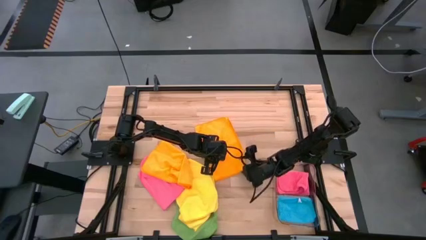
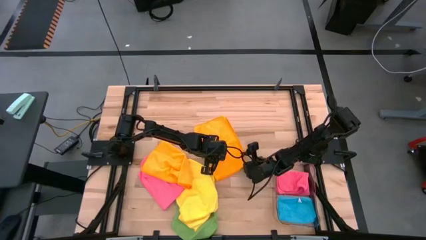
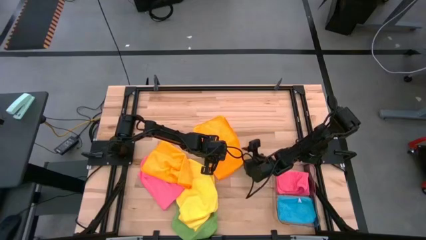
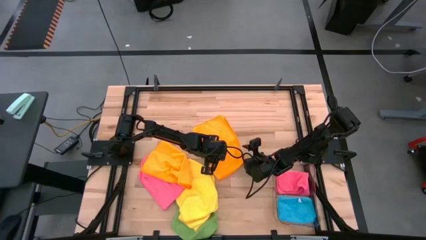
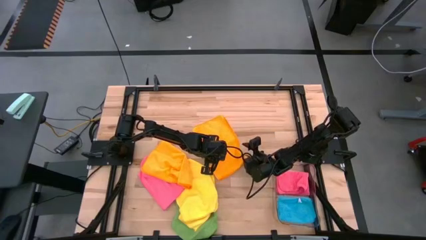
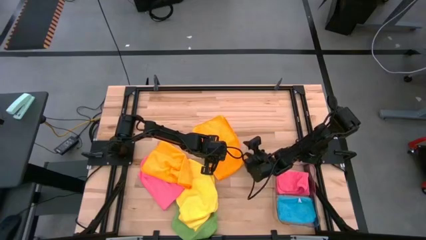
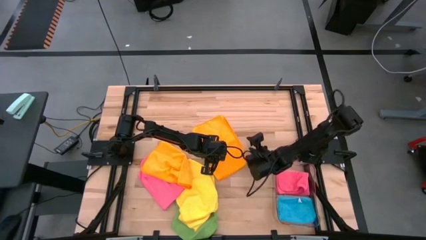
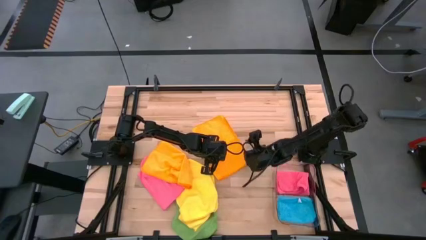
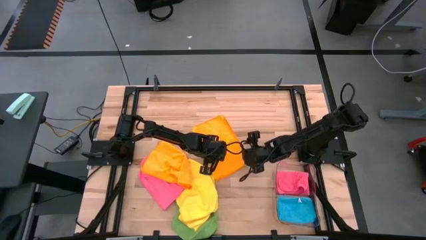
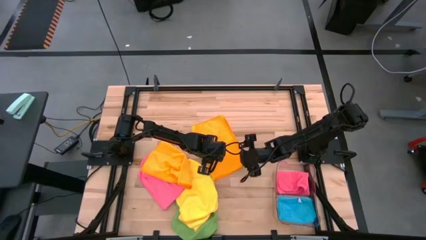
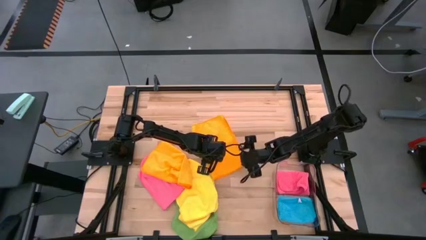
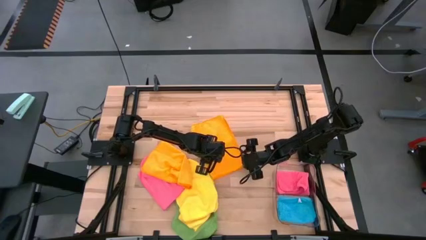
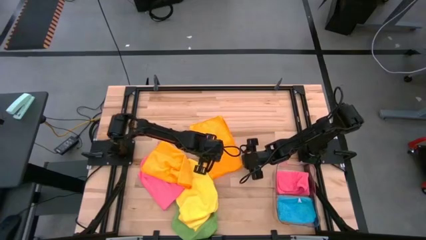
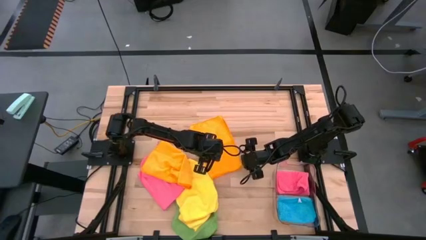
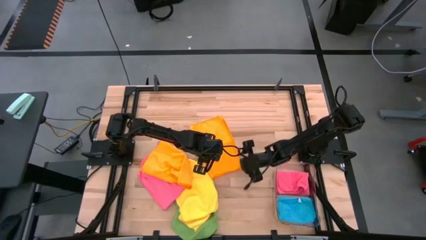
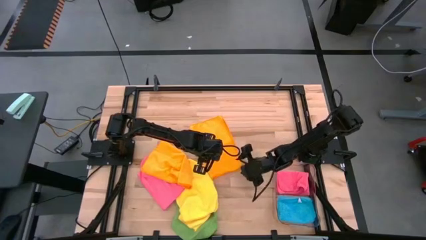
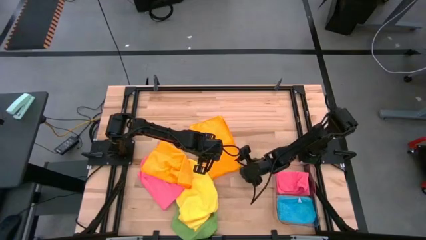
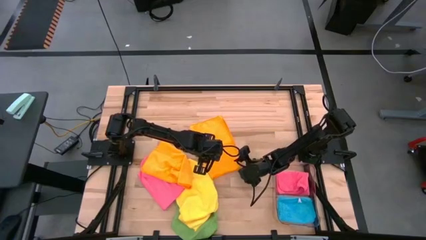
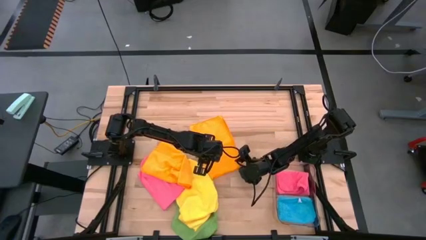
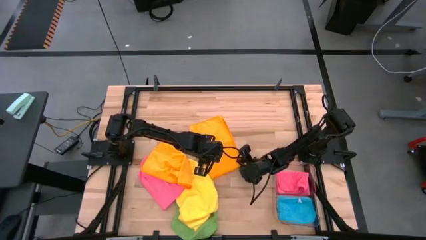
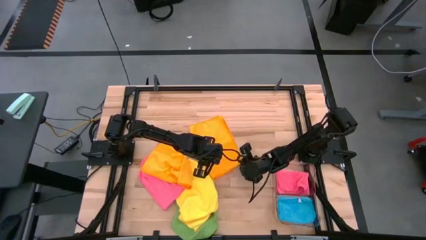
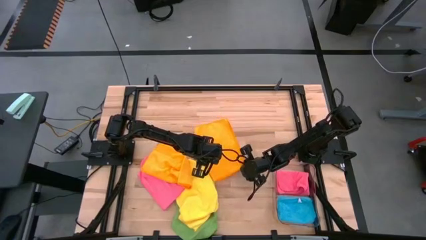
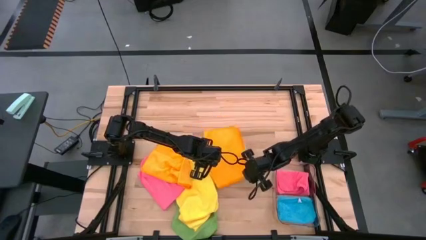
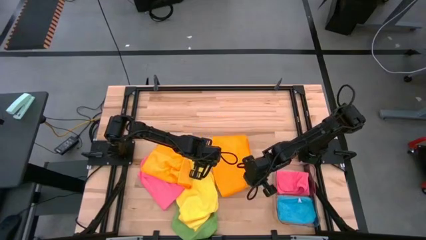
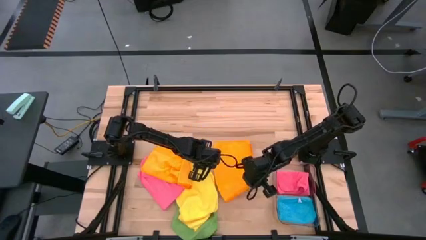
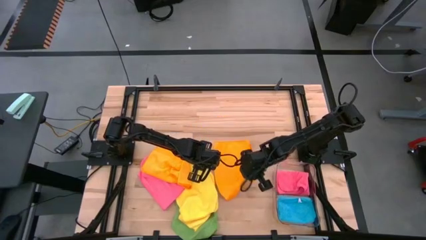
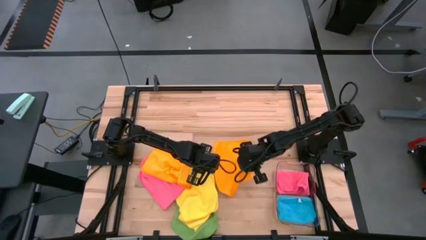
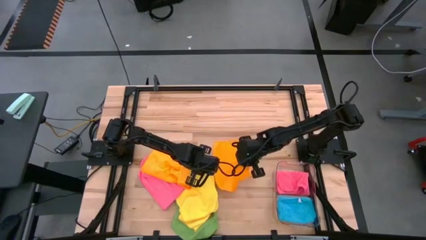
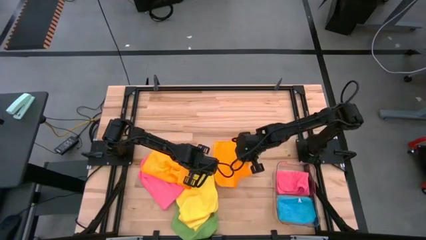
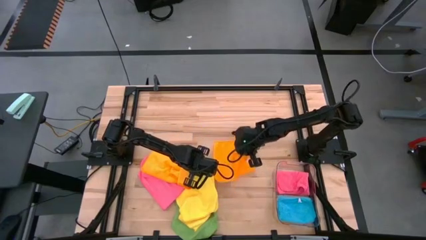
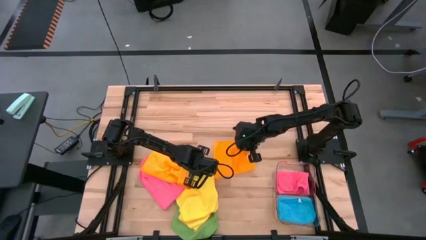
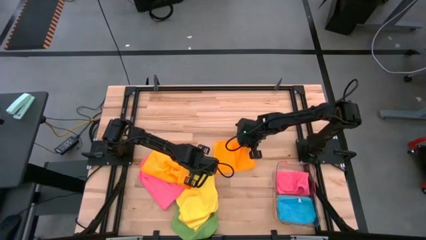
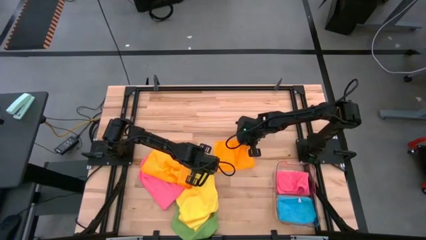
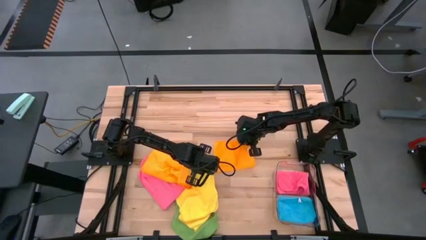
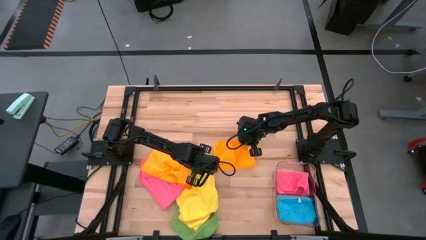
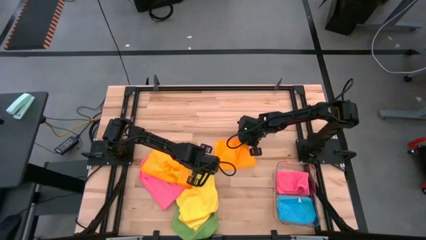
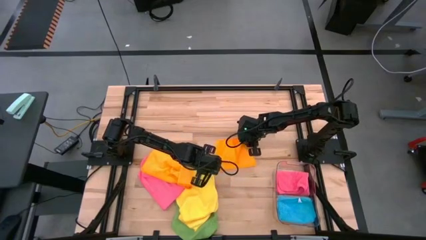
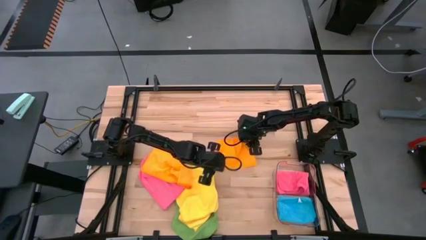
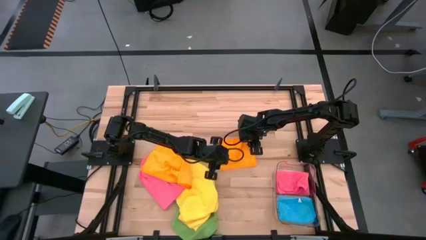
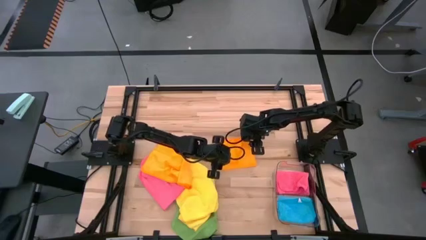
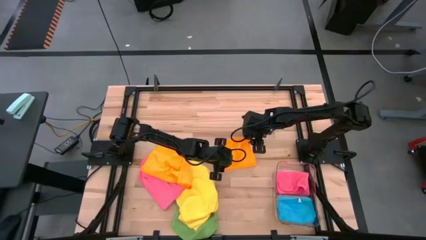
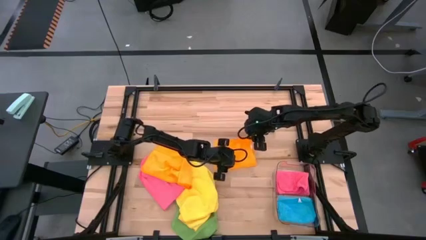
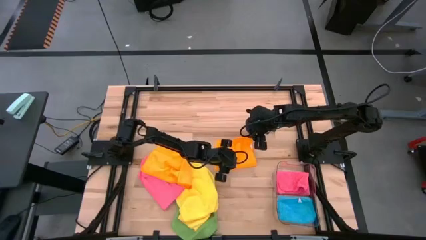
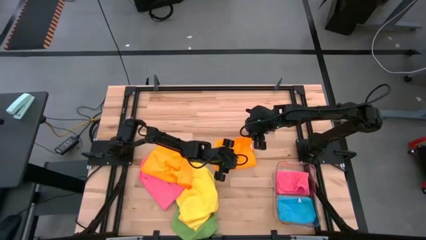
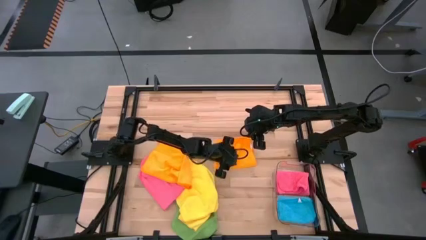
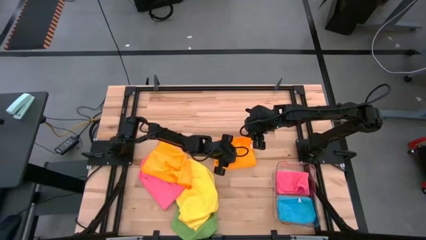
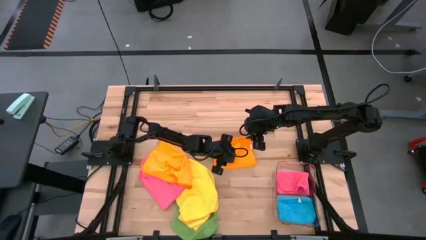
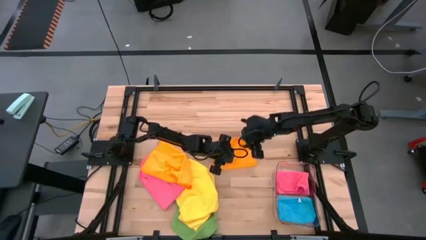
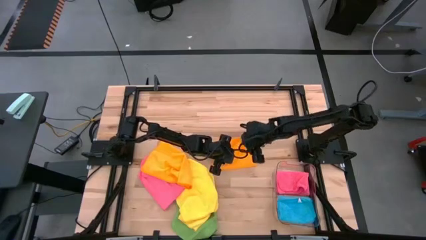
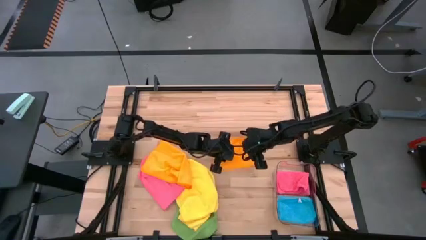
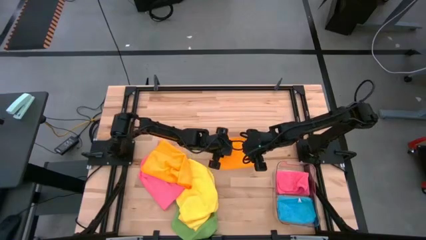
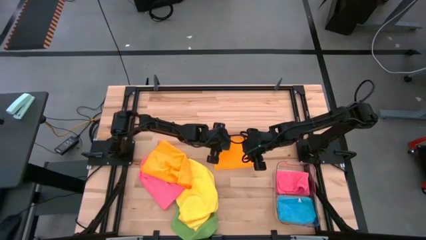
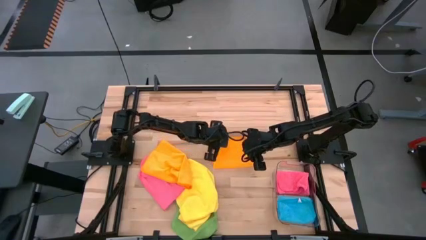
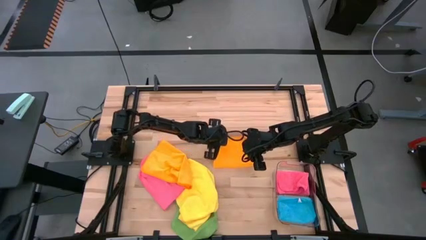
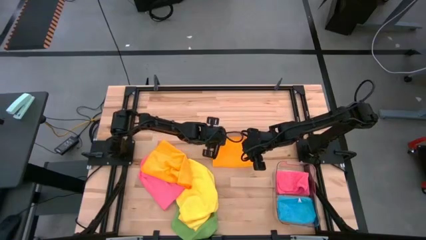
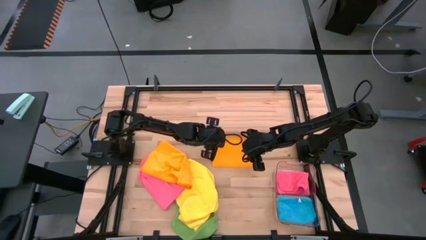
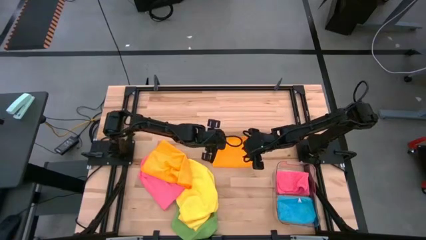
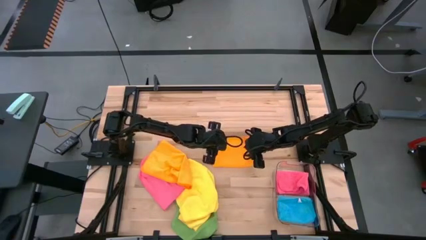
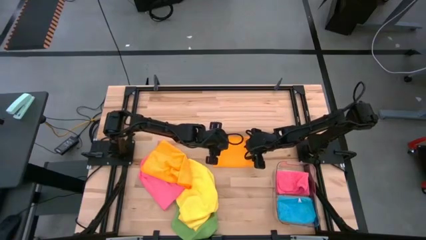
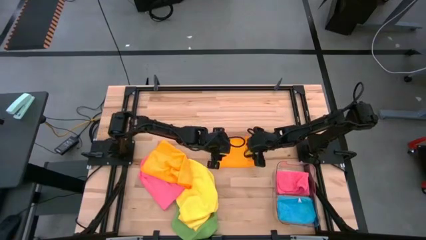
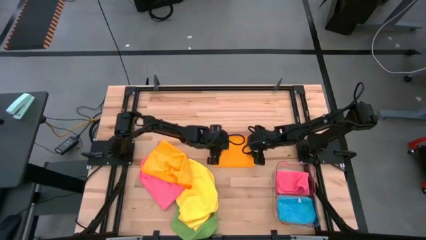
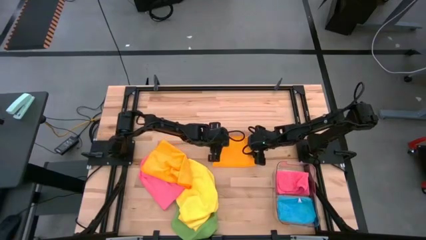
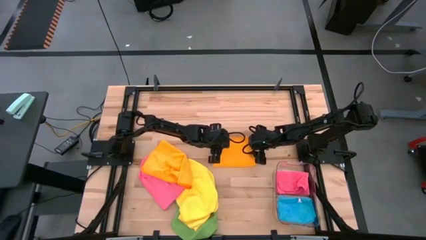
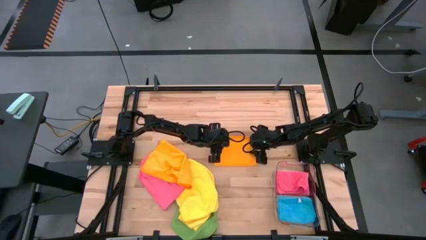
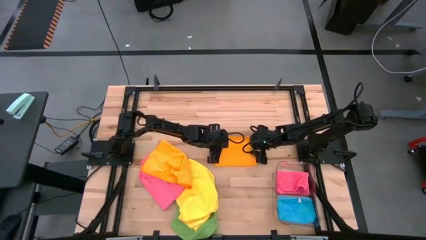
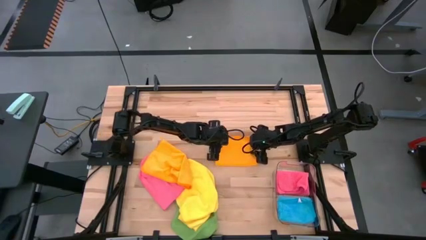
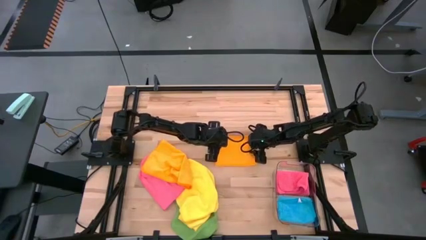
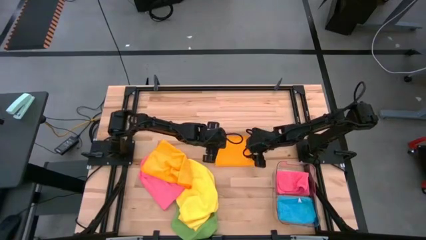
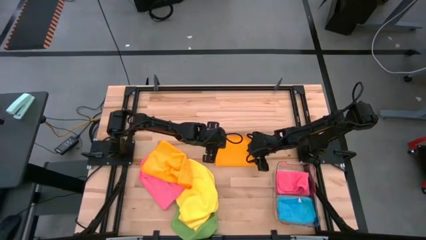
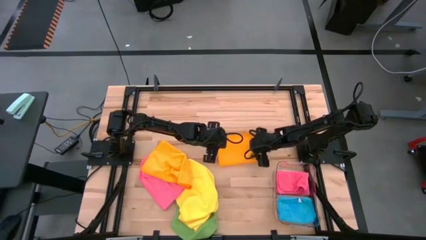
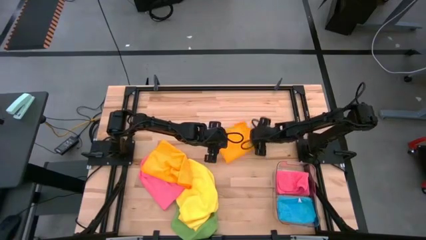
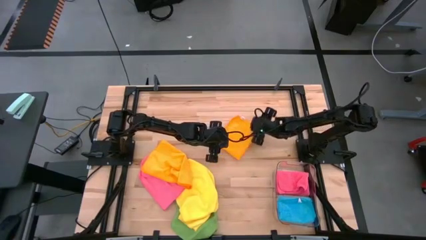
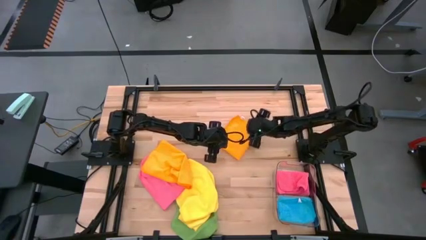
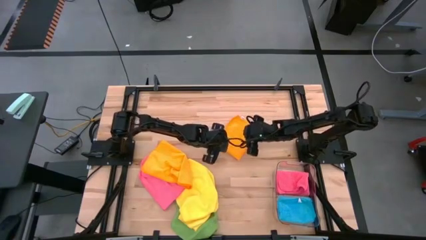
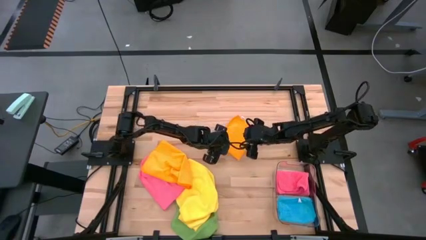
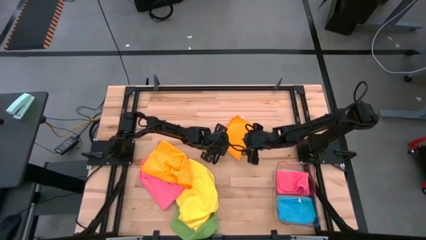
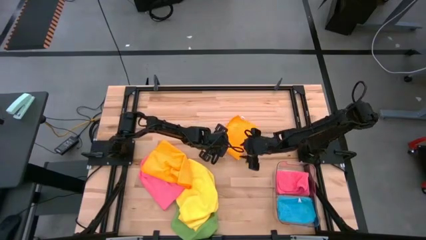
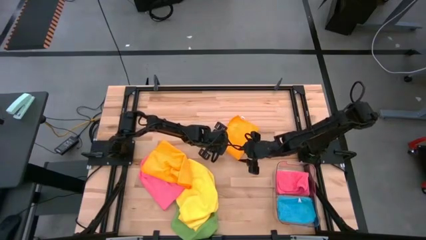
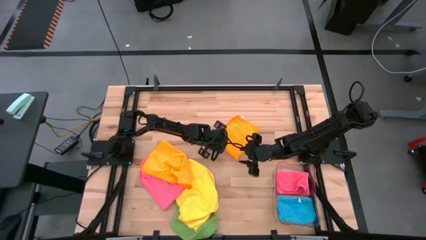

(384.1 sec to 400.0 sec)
Task: Fold microfiber towels
Fold the orange towel
